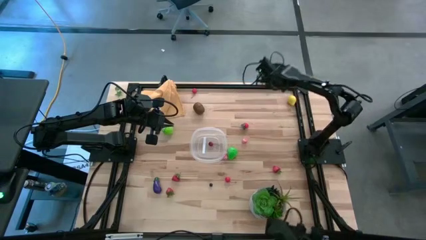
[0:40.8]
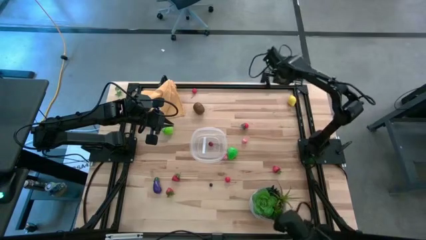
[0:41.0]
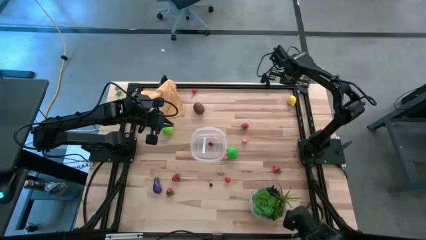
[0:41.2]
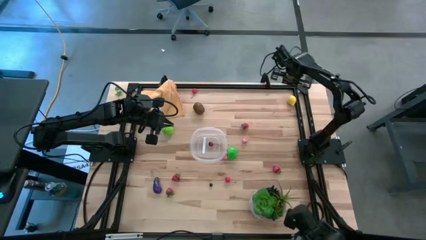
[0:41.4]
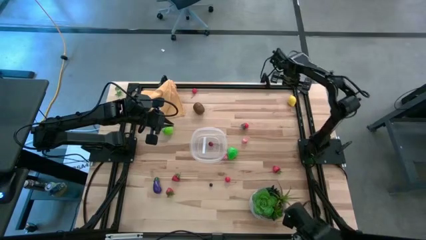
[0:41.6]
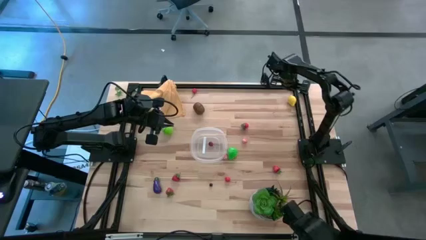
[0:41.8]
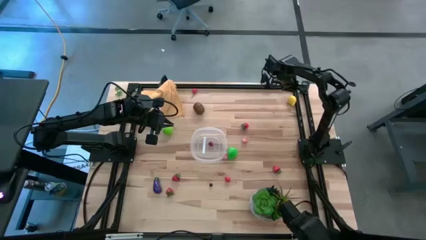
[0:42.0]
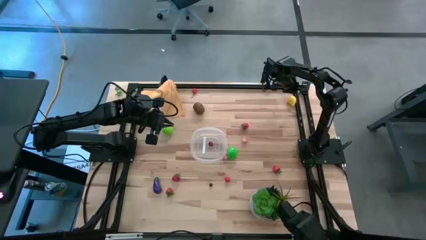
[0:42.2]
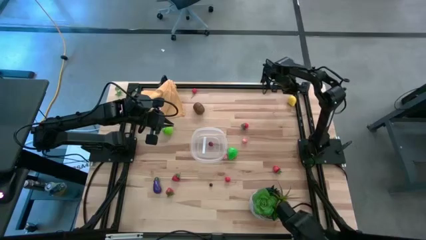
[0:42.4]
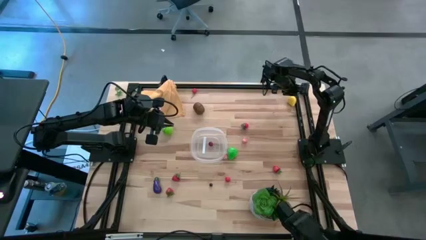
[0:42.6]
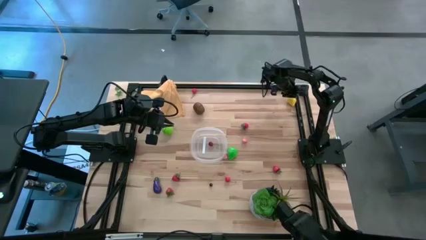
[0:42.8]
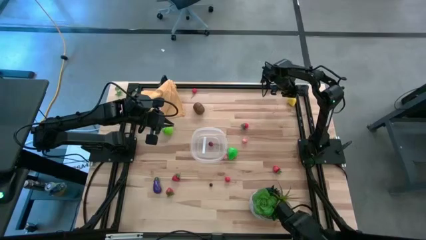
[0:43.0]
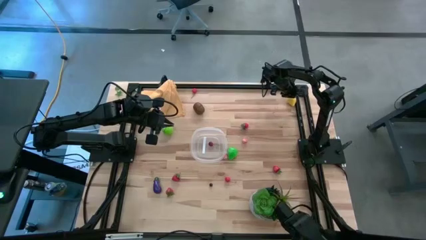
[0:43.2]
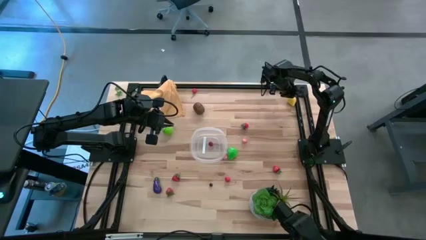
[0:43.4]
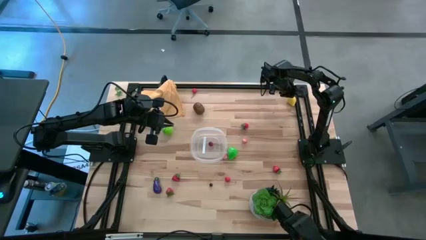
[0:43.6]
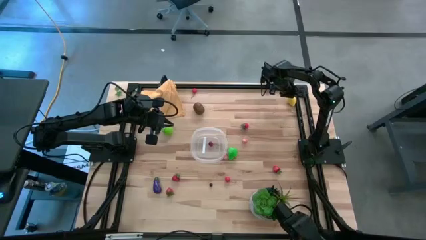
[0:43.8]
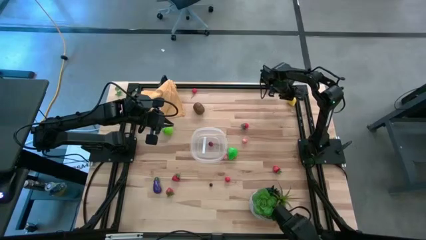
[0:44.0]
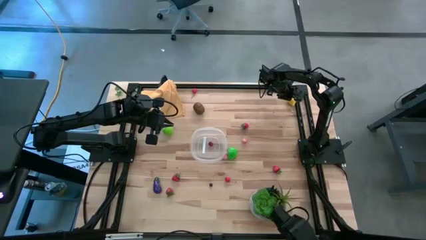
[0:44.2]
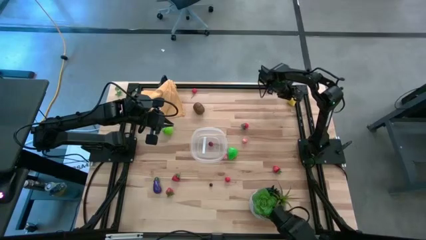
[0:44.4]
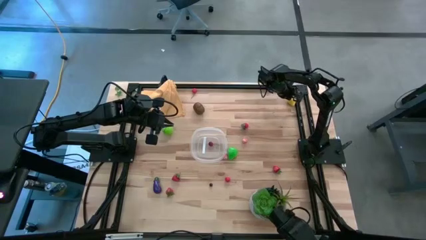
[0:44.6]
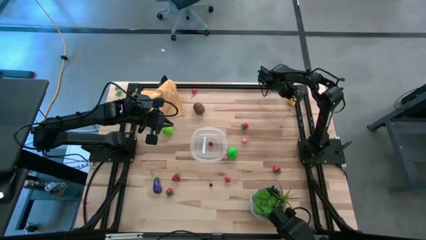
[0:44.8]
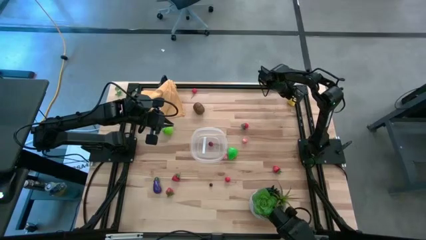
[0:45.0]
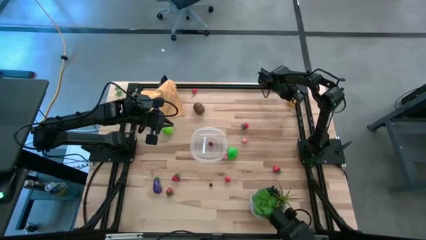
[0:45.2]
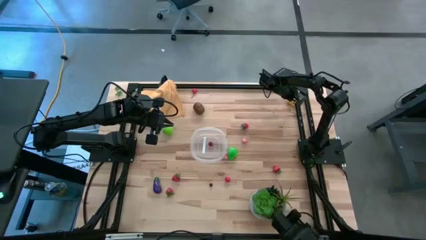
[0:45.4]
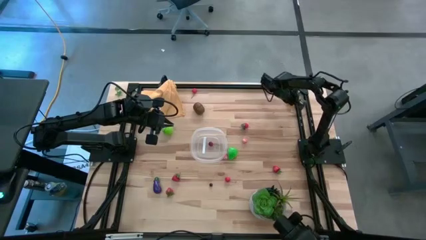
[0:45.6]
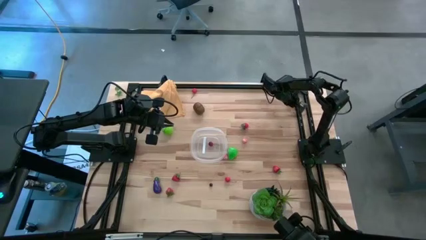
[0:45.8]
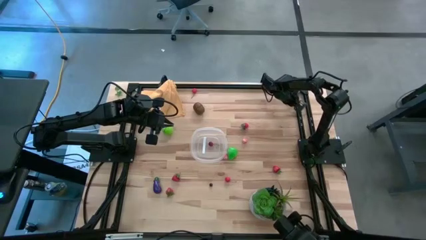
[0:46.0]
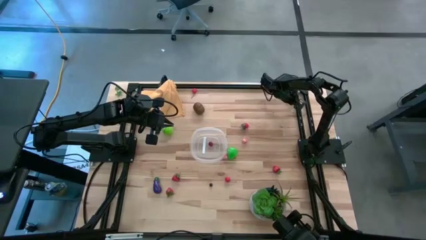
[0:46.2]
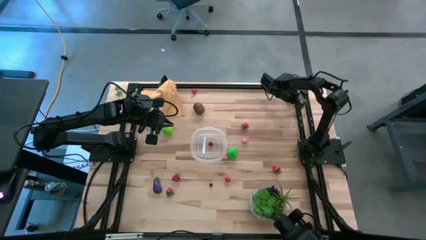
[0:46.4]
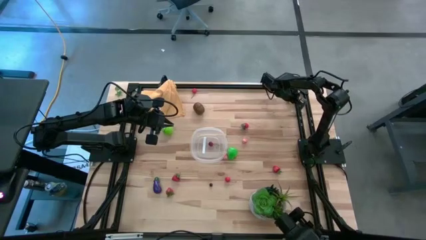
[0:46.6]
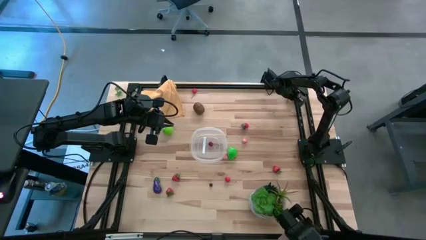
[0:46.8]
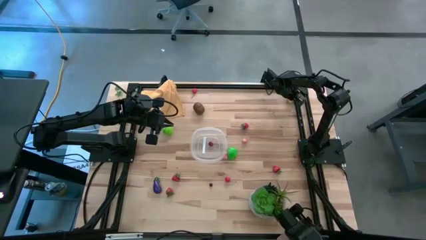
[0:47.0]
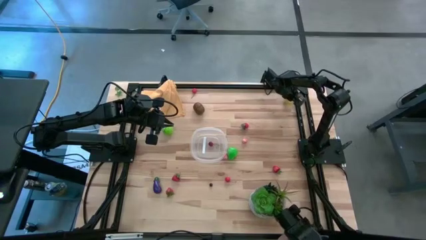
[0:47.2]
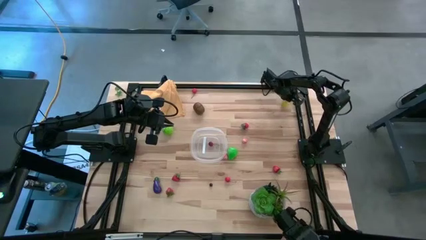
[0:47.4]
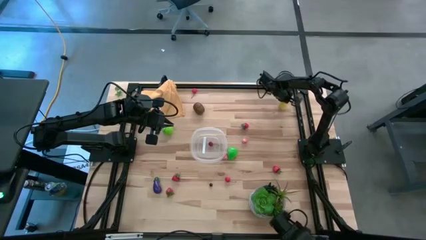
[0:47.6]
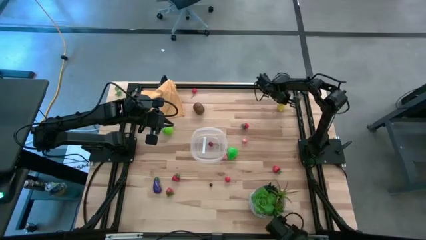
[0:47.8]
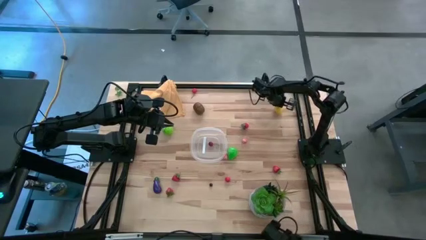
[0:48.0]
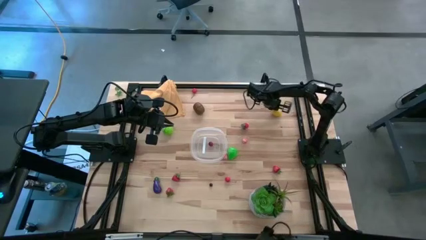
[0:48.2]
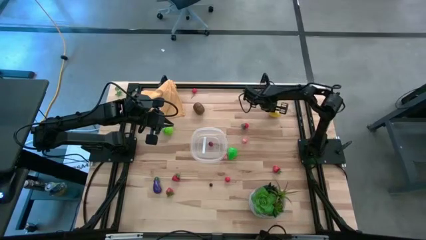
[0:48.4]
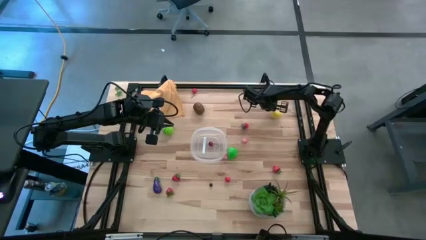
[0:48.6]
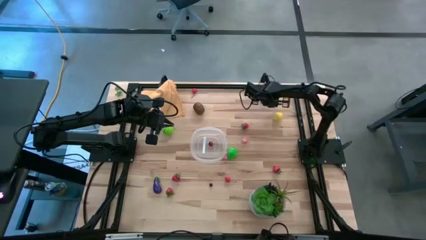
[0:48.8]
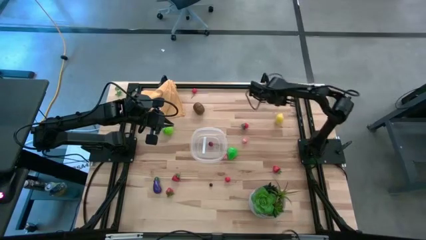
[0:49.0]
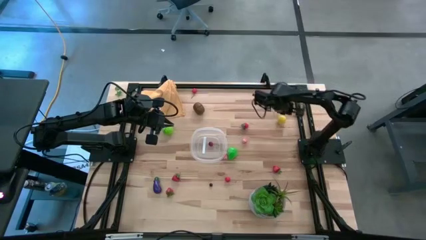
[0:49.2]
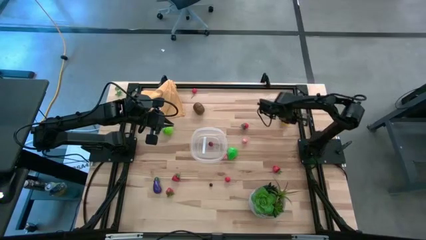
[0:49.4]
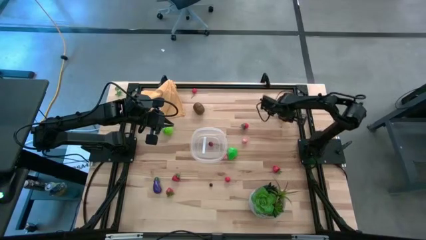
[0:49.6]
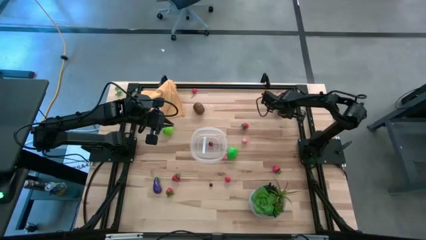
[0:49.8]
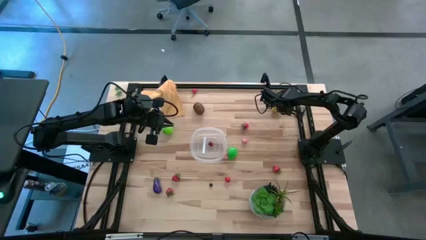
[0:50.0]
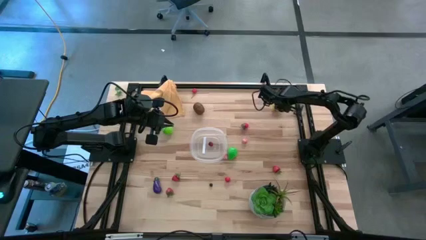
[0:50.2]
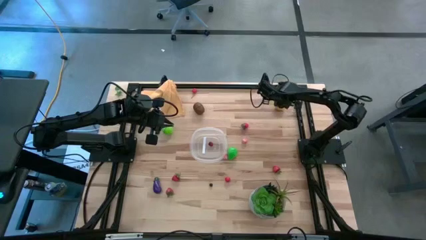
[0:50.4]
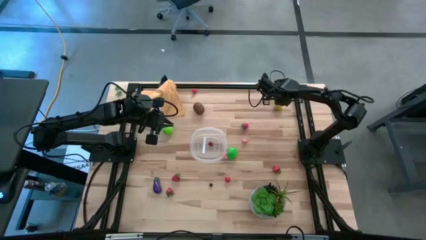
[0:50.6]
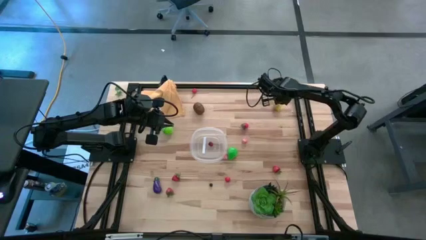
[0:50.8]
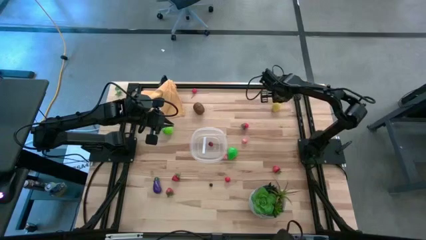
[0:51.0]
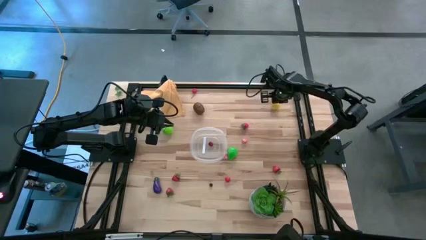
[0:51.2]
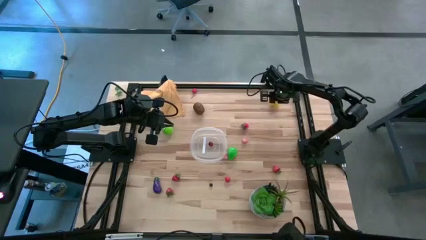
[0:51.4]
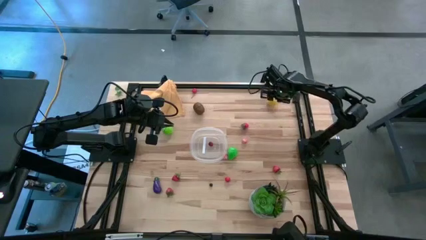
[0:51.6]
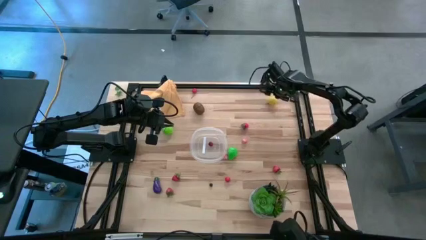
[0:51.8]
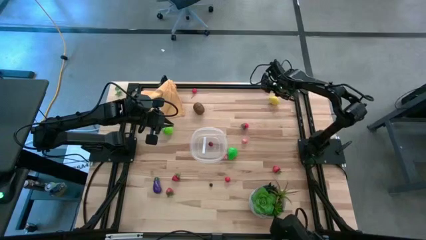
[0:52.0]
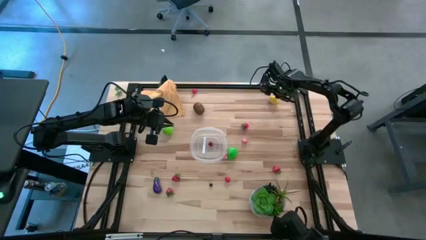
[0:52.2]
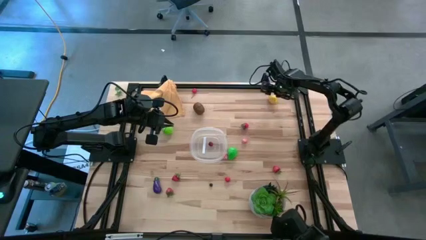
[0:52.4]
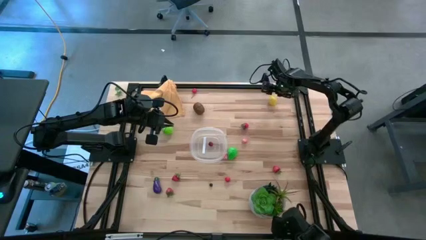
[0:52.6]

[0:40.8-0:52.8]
Task: Pick and placing Produce into tupperware
Put the lemon into the transparent bin

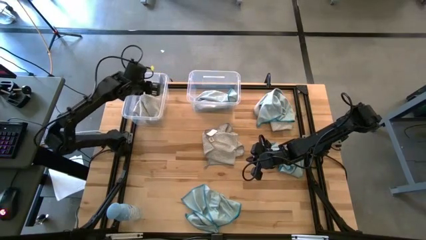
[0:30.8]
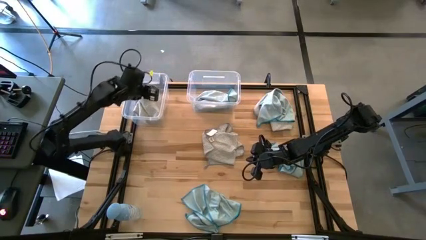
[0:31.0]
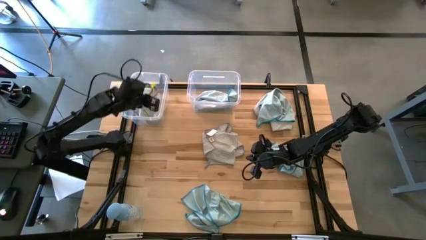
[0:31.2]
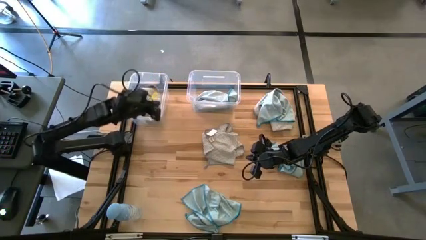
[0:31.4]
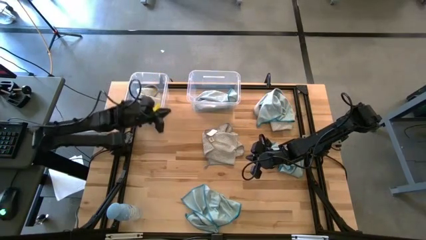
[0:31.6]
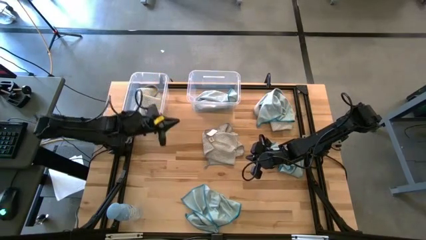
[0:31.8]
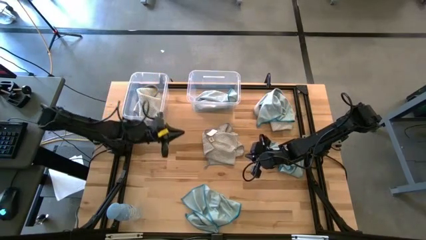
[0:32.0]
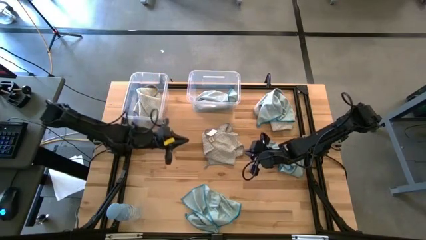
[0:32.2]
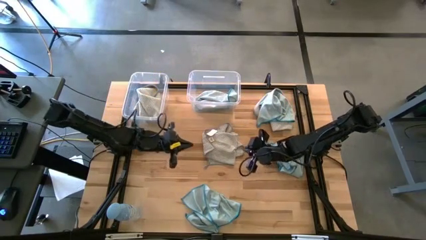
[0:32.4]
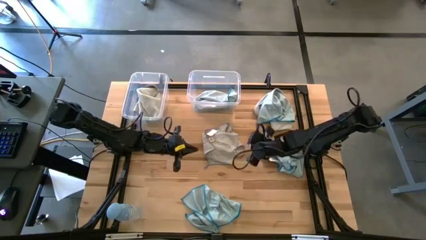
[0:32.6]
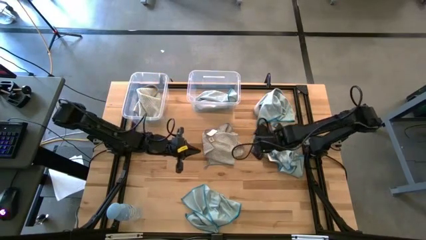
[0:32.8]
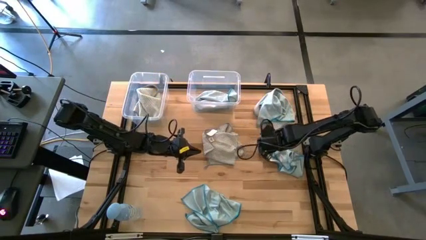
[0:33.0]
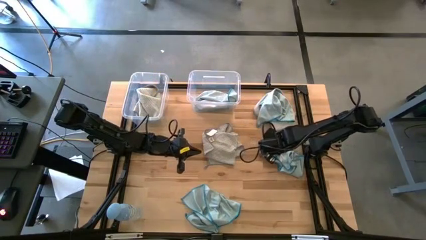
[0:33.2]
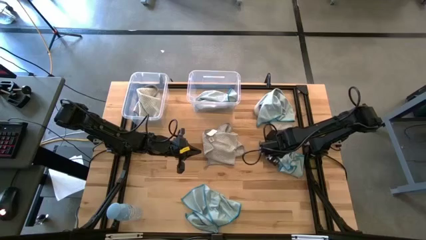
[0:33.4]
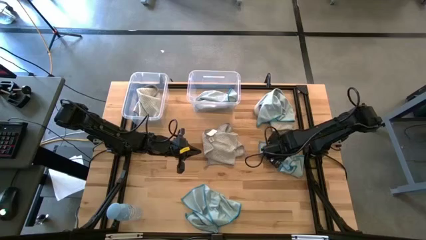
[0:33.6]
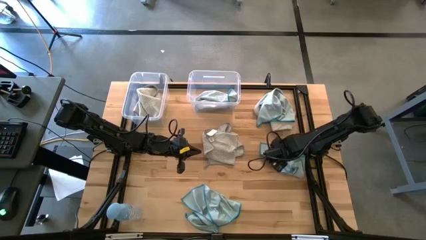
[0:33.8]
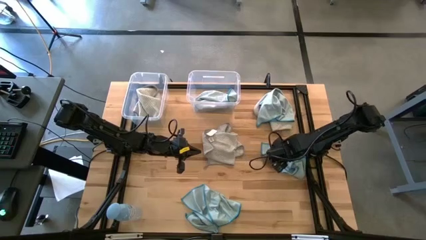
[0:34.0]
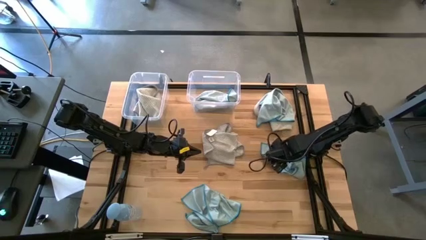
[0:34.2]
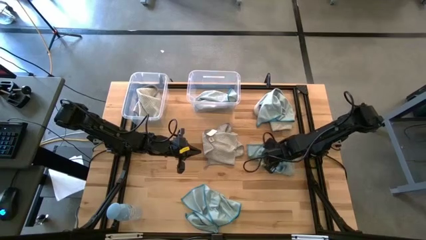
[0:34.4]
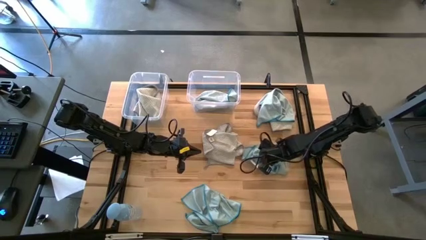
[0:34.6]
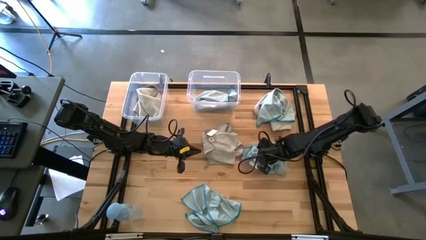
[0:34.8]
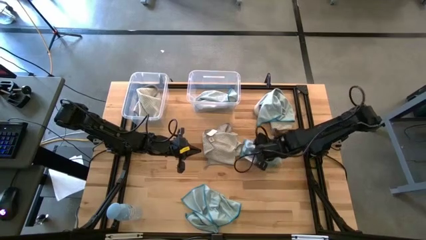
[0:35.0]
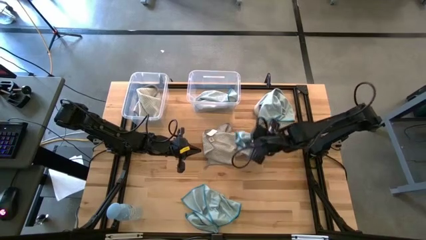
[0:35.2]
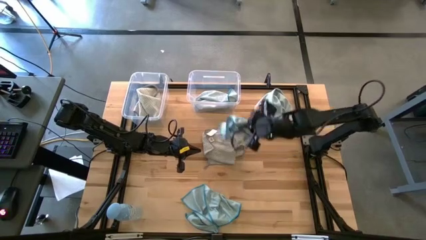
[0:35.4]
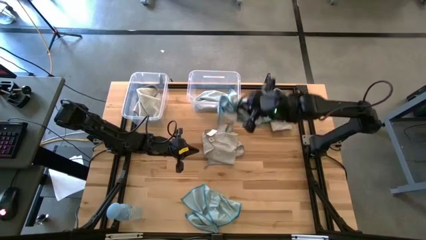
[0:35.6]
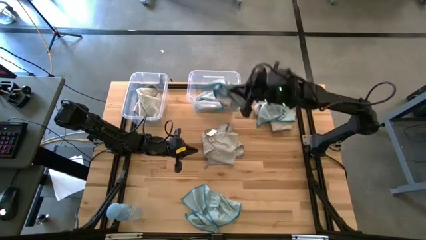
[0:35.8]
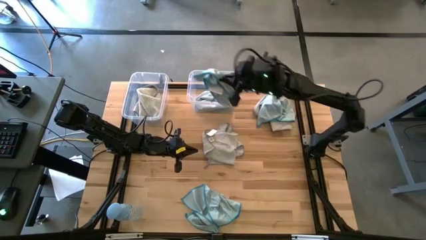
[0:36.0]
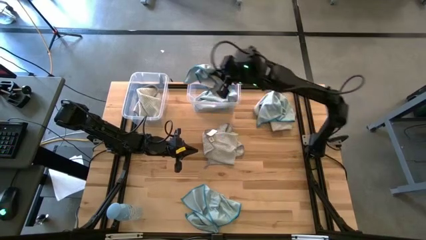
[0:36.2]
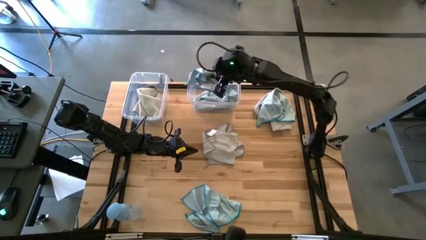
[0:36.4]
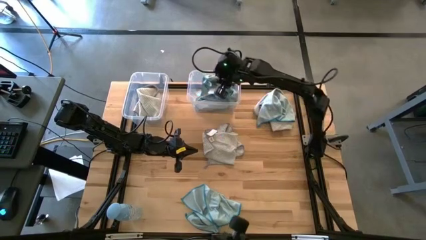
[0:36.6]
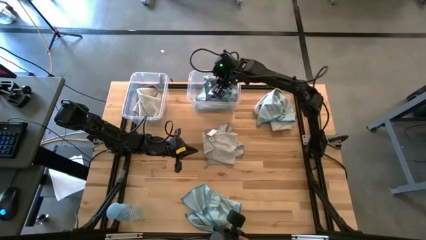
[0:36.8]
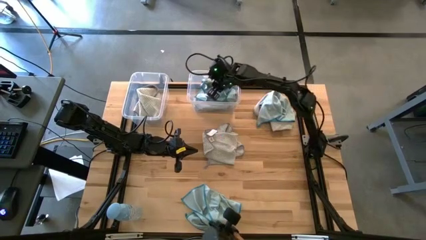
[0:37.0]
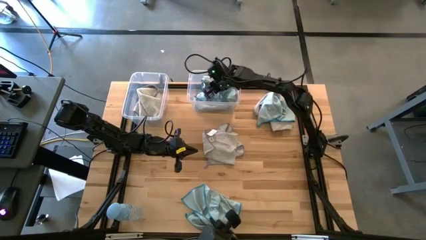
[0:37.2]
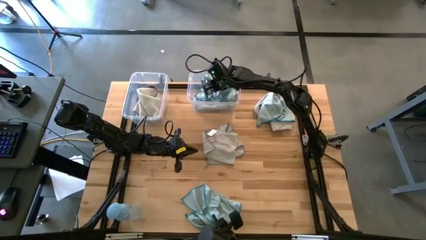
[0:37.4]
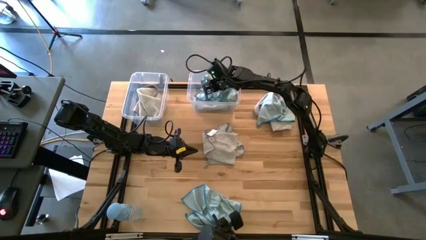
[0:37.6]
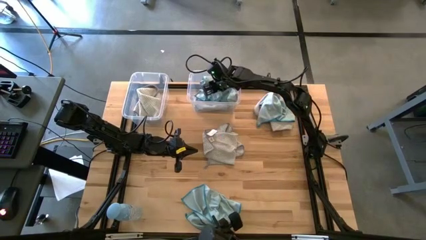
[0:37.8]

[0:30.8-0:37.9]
Task: Sort microfiber towel by color & place in baskets
Put the middle right blue microfiber cloth into the right transparent bin
